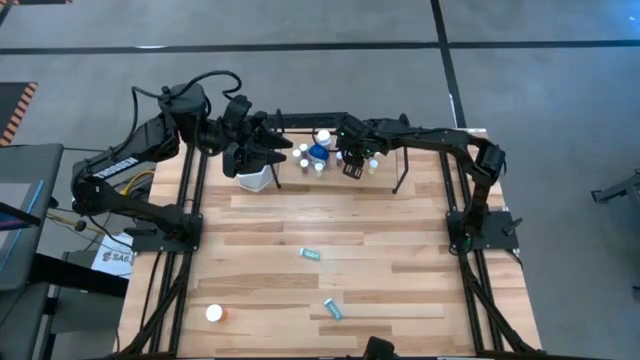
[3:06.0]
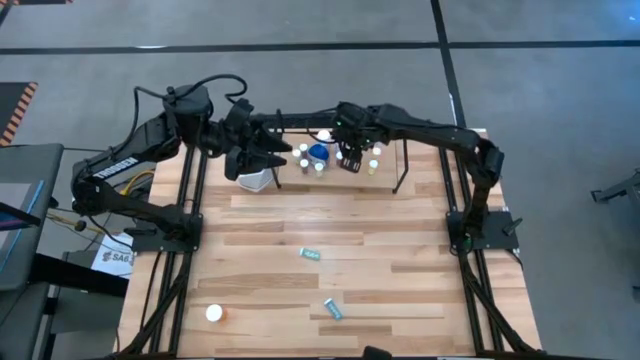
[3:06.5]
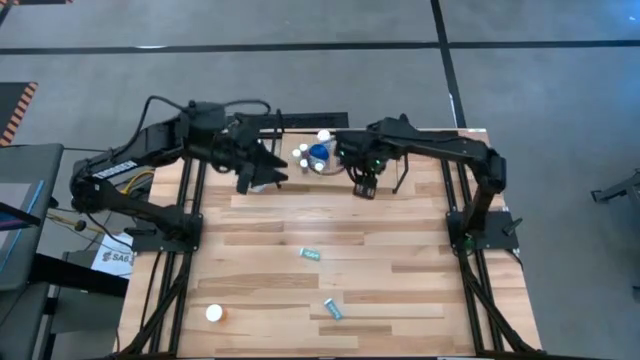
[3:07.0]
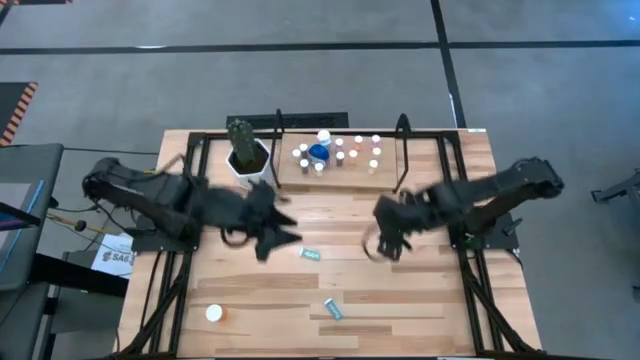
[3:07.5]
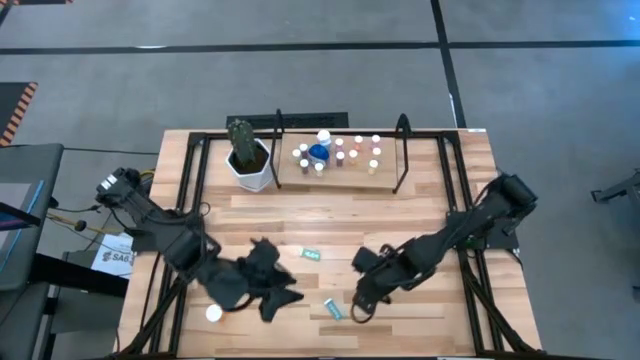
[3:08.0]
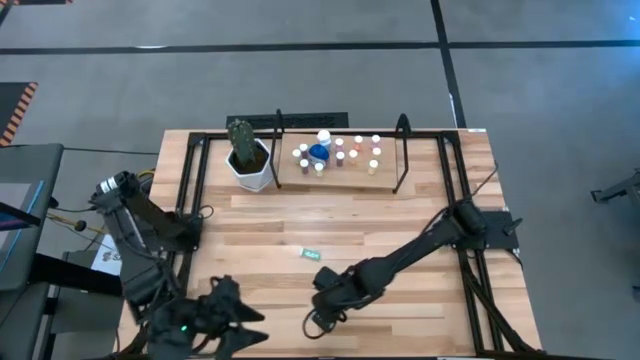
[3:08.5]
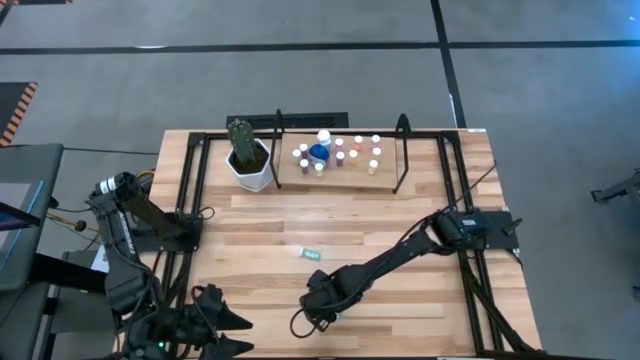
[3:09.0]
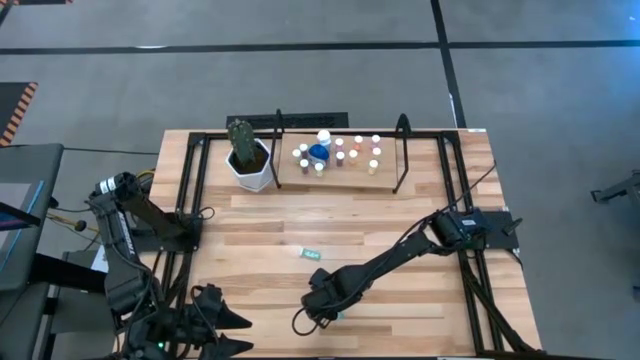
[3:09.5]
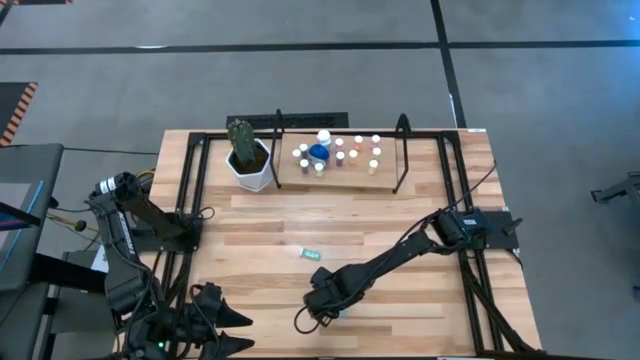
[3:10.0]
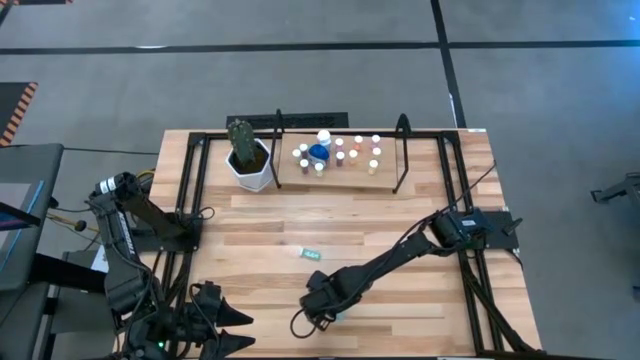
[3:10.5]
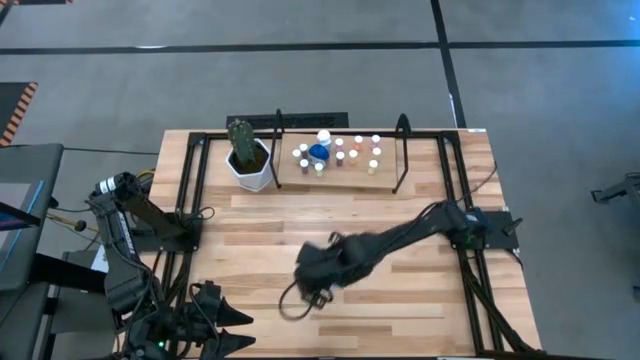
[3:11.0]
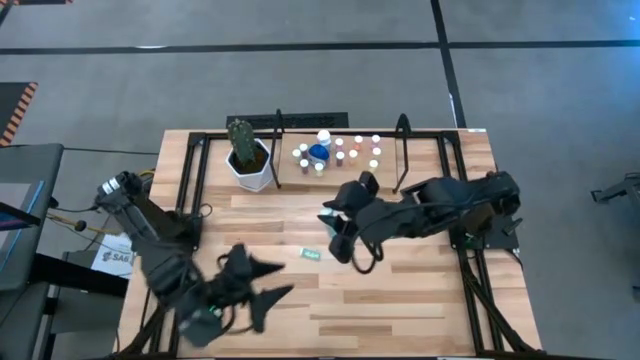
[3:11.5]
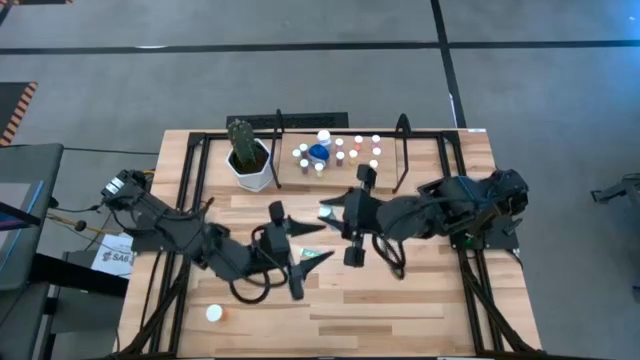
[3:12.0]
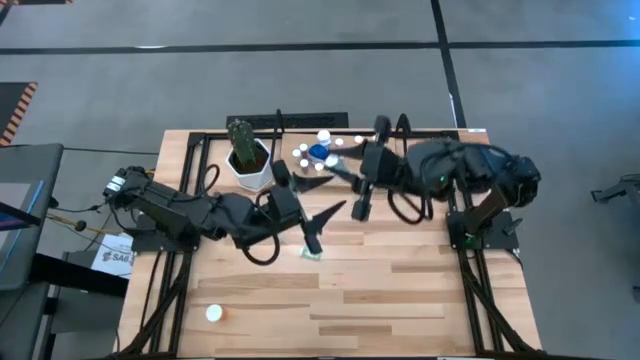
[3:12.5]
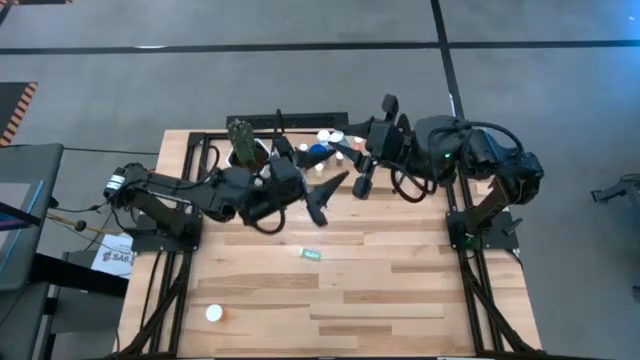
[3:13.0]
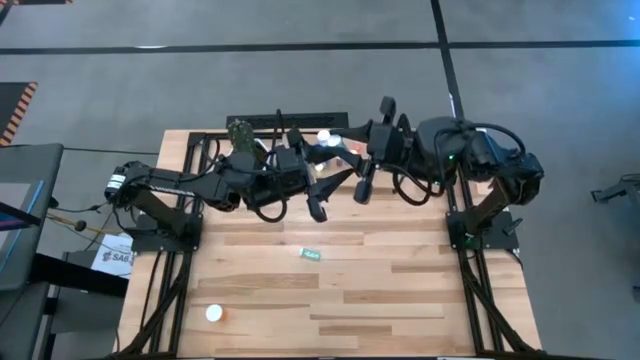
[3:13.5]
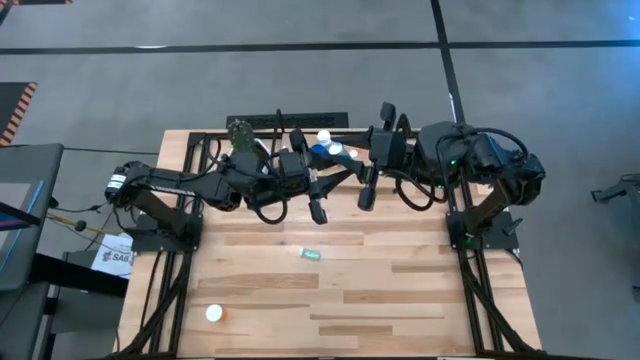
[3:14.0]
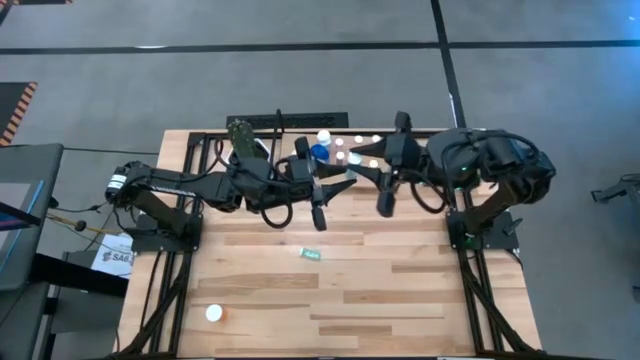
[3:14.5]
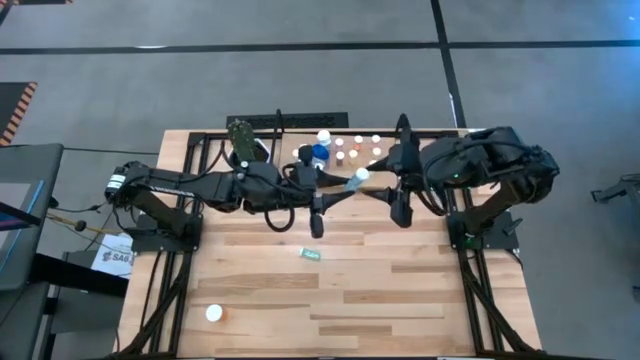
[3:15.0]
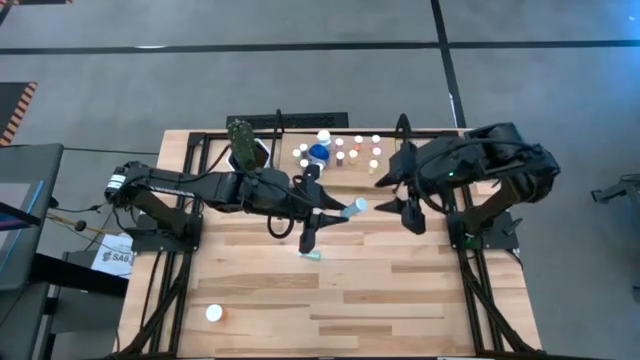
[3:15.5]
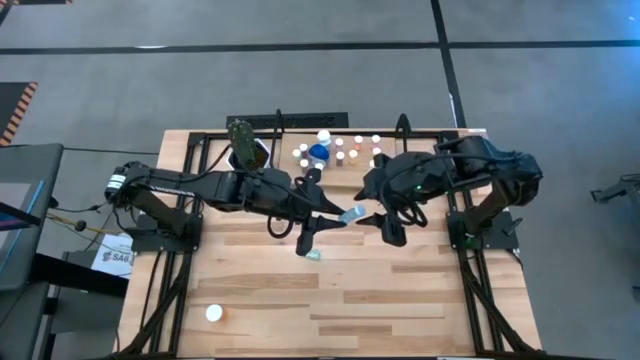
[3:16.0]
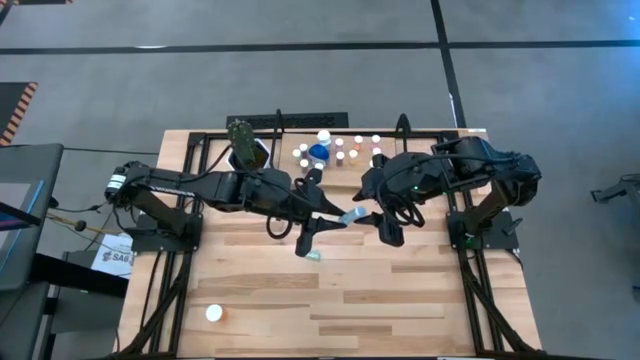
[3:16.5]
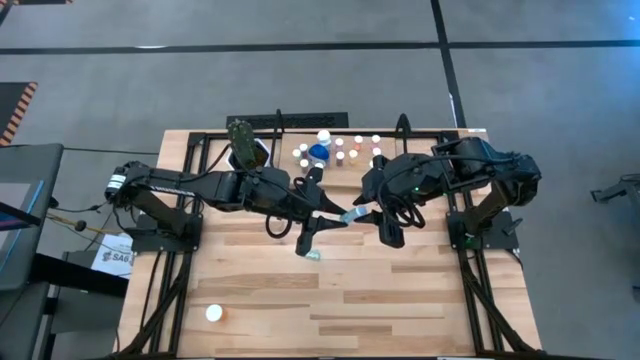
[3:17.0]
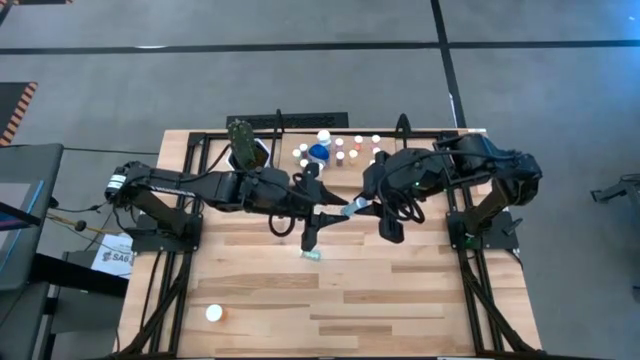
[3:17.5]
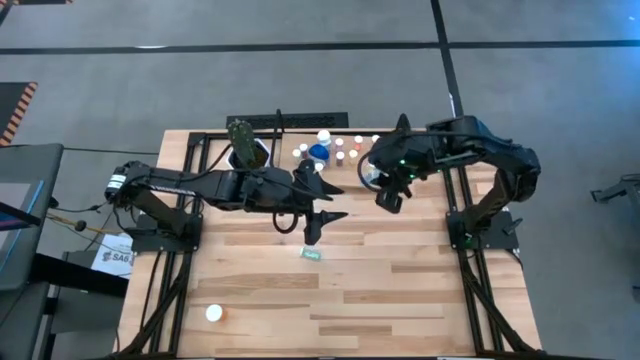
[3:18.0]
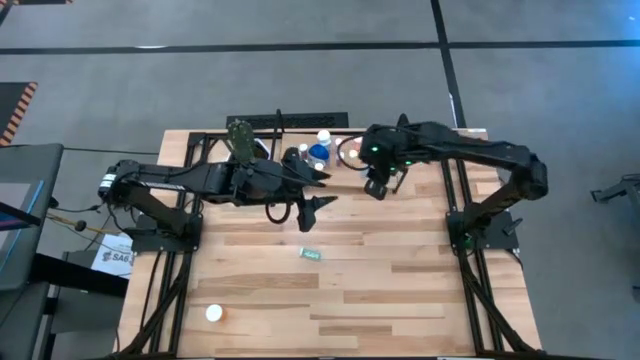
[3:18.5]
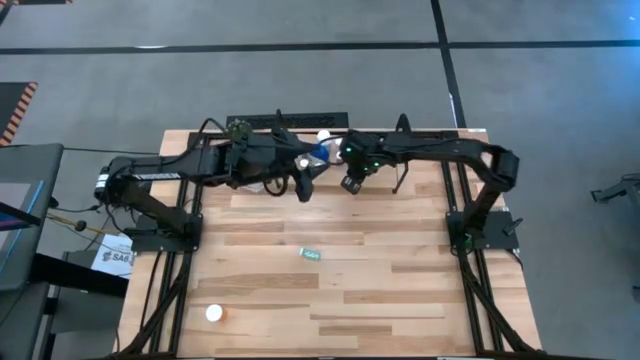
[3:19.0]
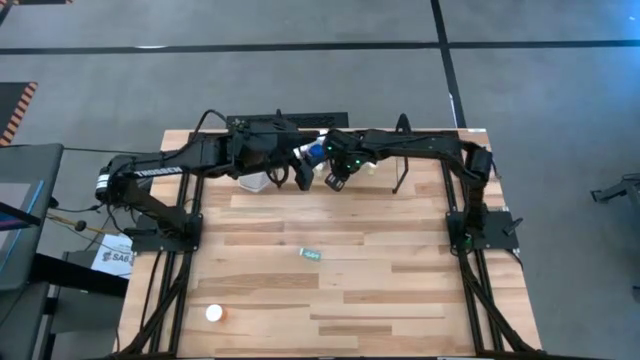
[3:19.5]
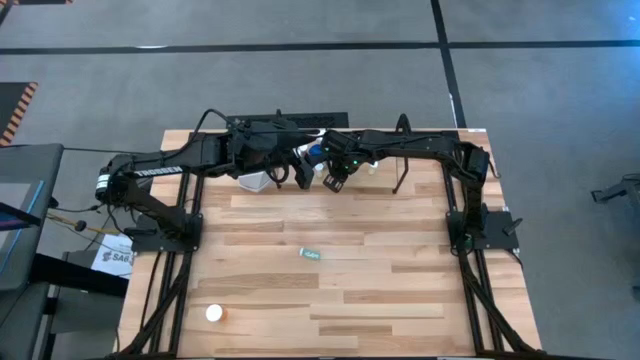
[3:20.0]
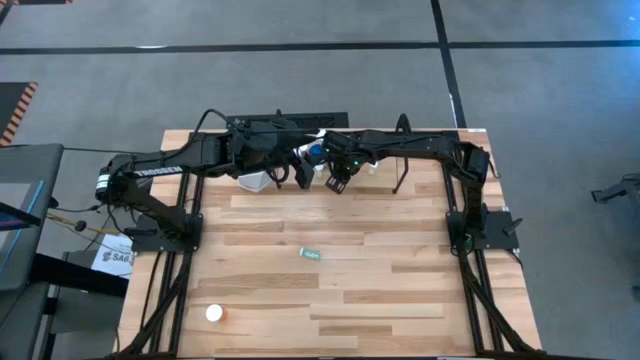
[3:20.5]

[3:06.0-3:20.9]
Task: Pick and place medicine bottles onto shelf by color
Put the small blue pill bottle on the shelf

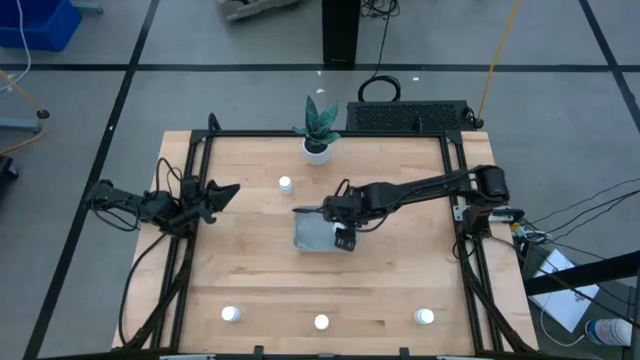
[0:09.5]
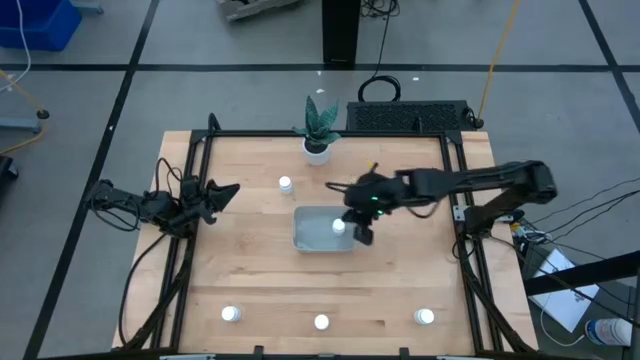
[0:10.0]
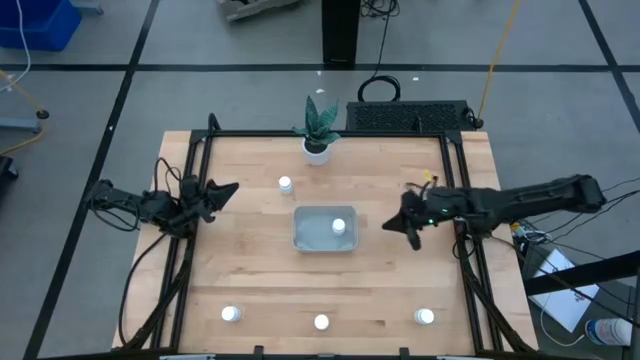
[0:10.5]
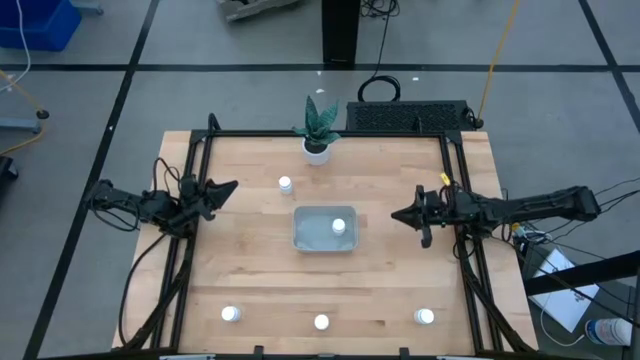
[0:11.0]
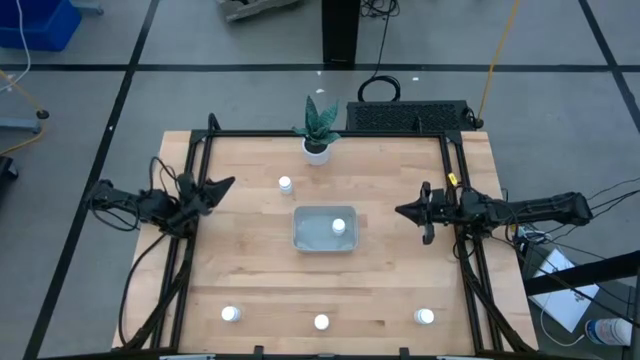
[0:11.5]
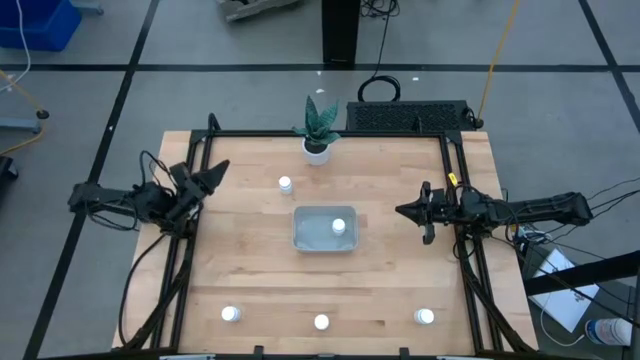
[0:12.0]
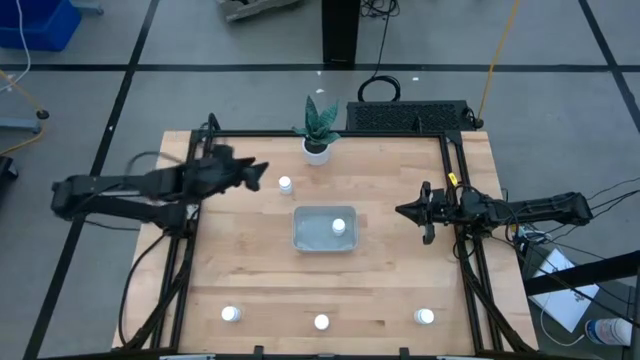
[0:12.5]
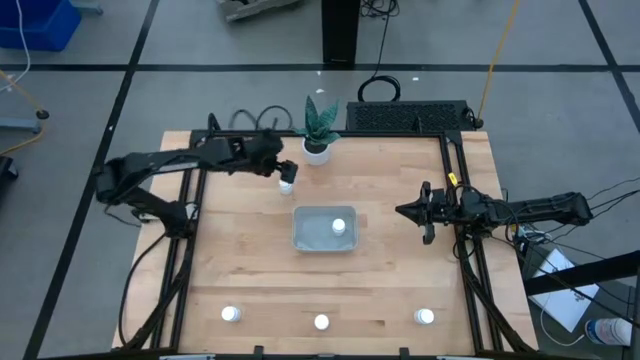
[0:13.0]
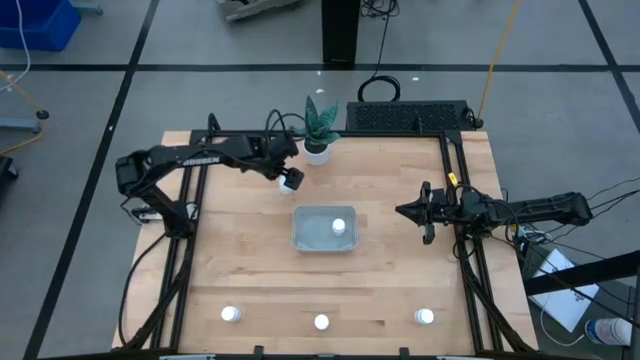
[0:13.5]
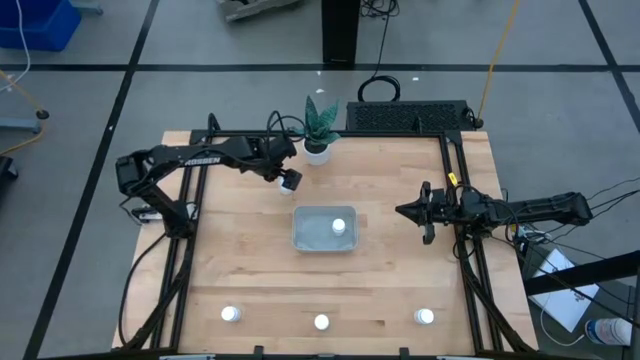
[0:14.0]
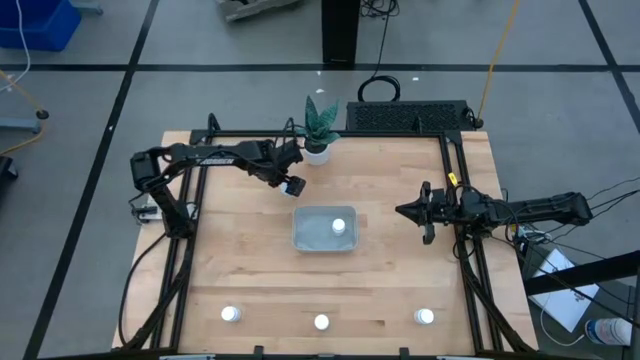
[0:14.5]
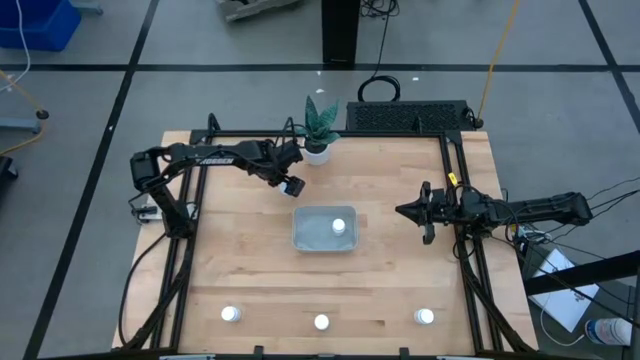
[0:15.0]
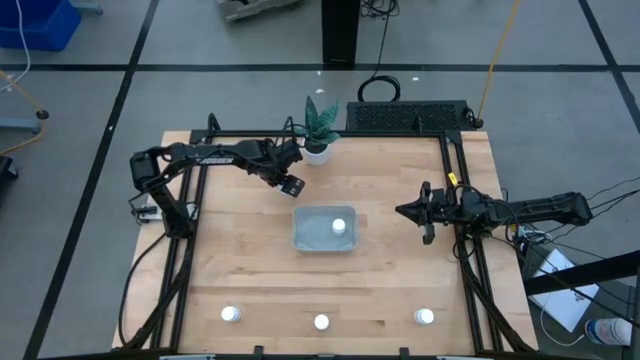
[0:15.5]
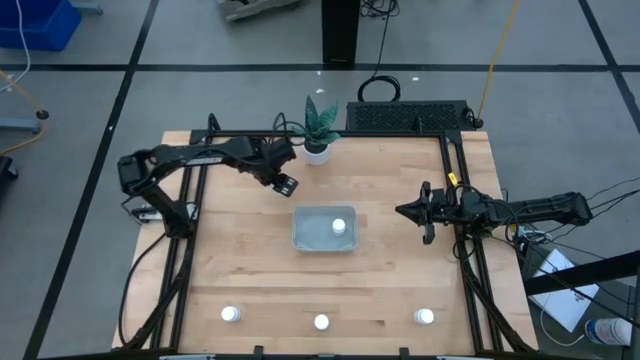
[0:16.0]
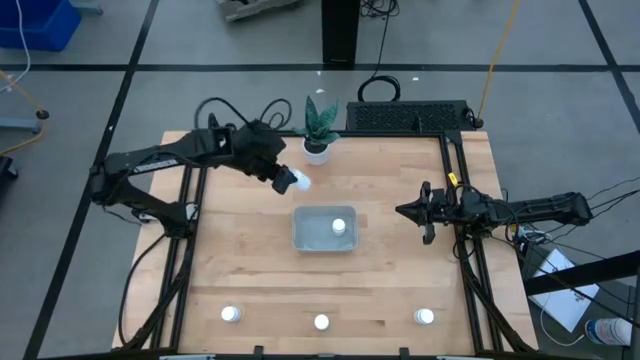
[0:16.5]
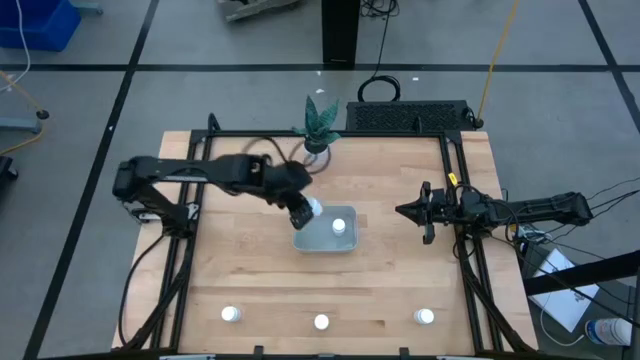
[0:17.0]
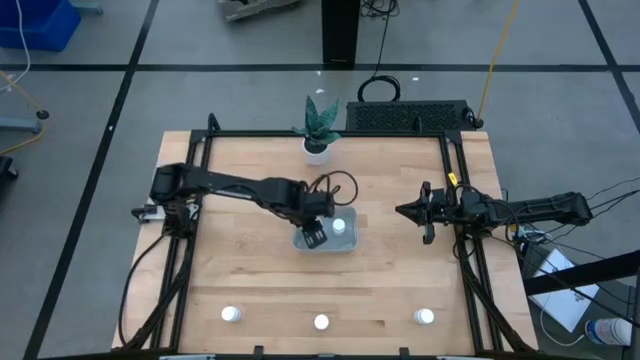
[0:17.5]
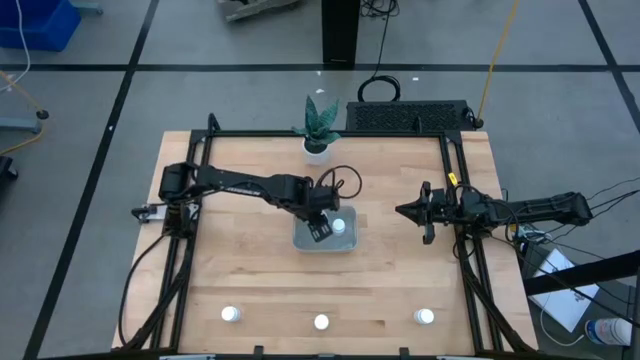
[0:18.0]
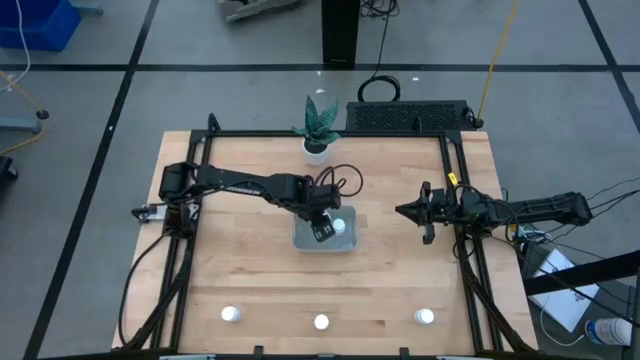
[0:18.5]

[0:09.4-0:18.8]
Task: Pick and place pill bottles into a basket
Put the white pill bottle into the gray bin
